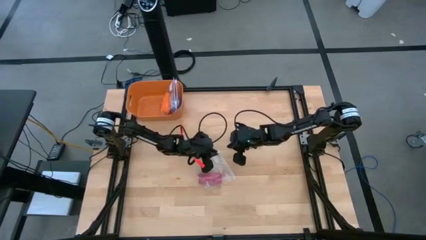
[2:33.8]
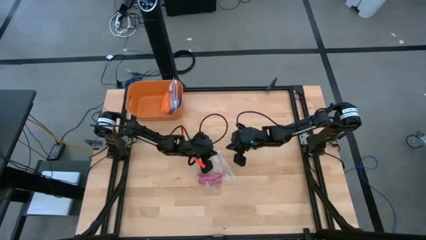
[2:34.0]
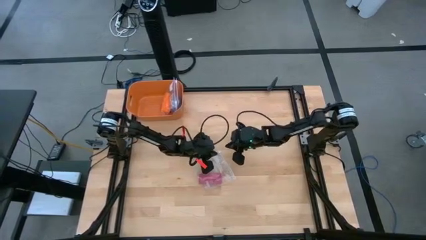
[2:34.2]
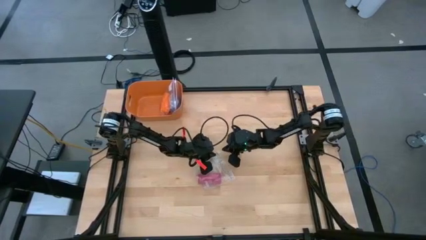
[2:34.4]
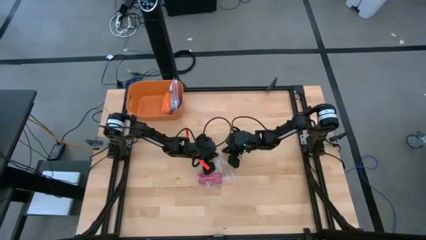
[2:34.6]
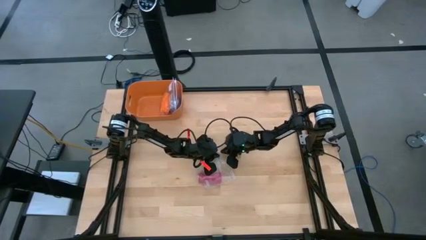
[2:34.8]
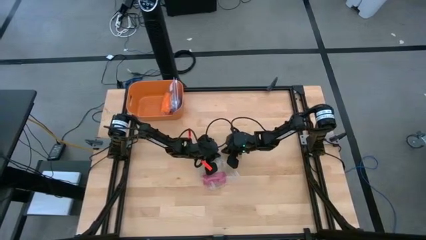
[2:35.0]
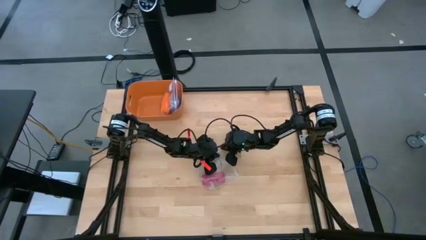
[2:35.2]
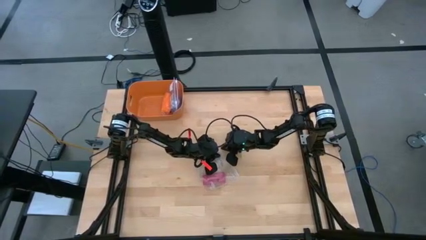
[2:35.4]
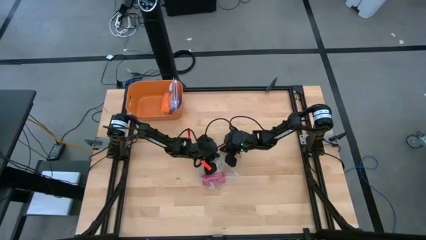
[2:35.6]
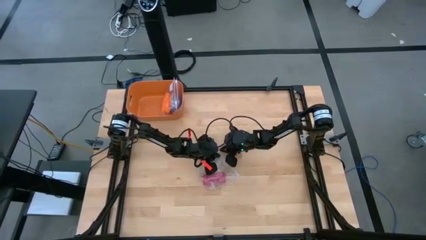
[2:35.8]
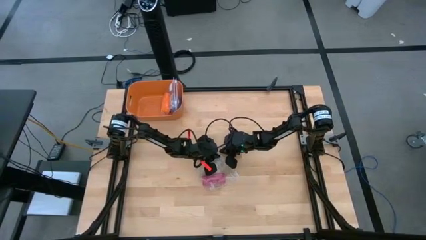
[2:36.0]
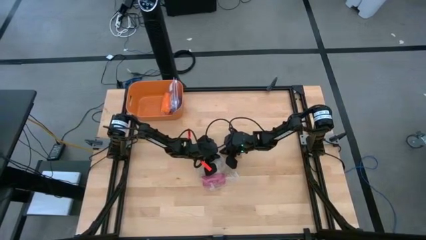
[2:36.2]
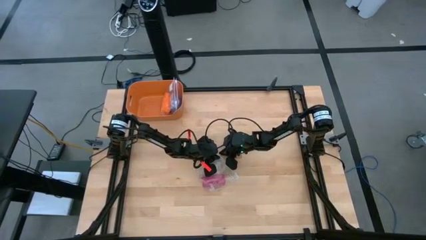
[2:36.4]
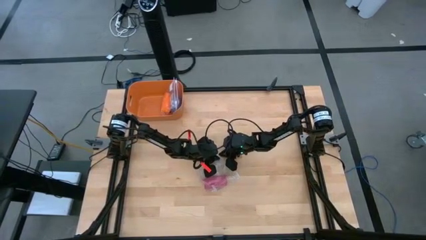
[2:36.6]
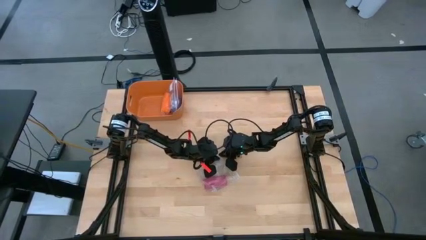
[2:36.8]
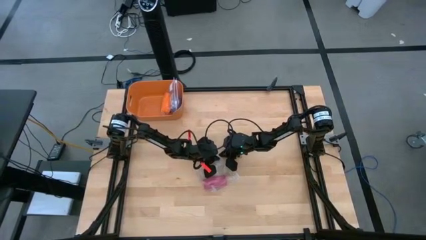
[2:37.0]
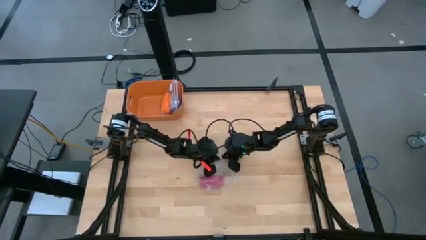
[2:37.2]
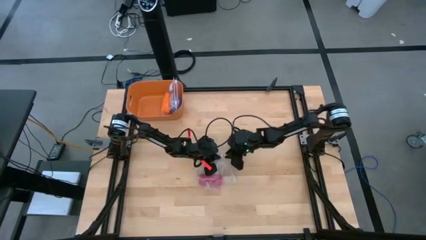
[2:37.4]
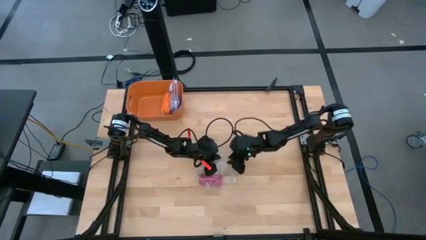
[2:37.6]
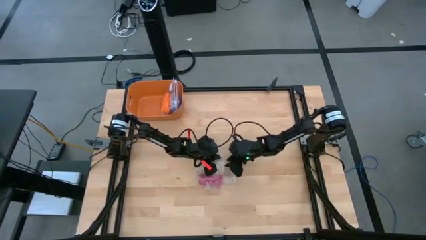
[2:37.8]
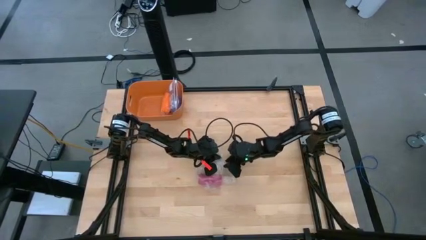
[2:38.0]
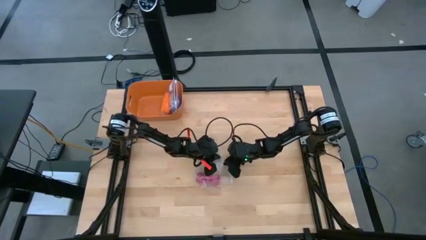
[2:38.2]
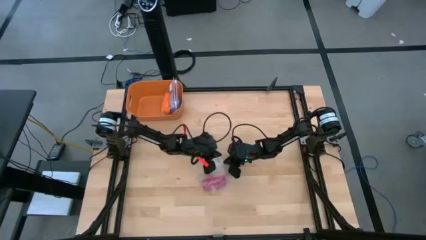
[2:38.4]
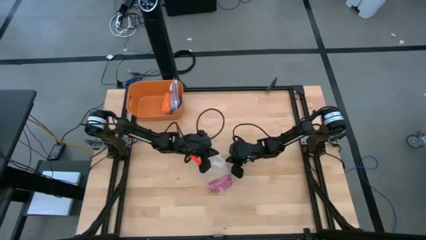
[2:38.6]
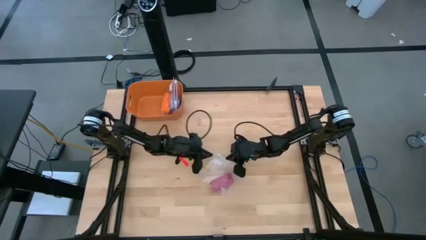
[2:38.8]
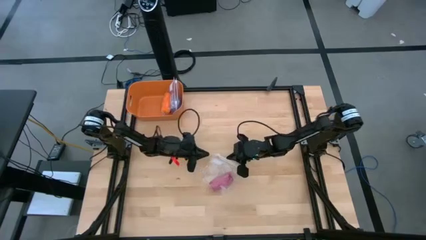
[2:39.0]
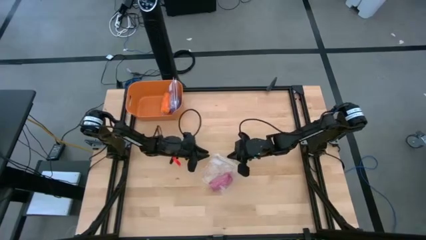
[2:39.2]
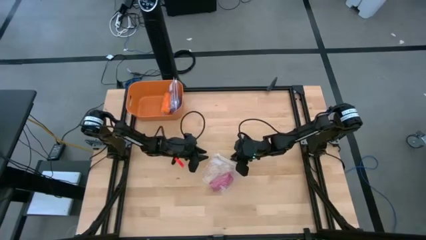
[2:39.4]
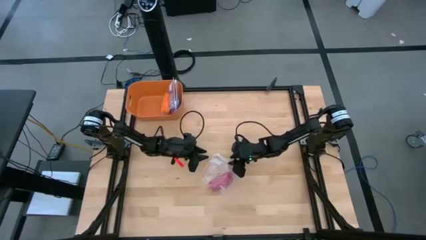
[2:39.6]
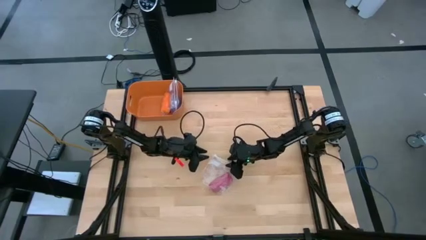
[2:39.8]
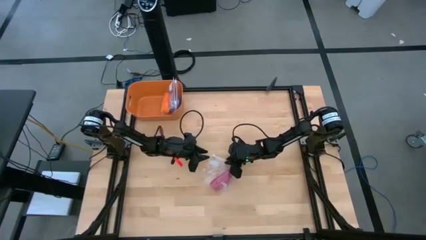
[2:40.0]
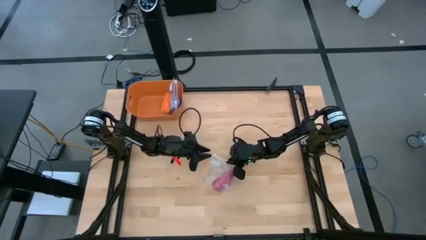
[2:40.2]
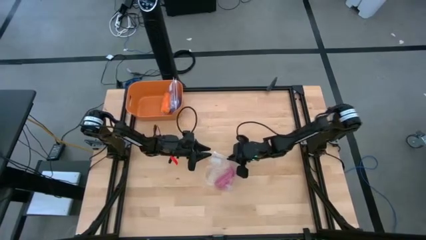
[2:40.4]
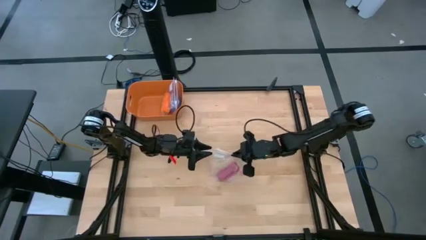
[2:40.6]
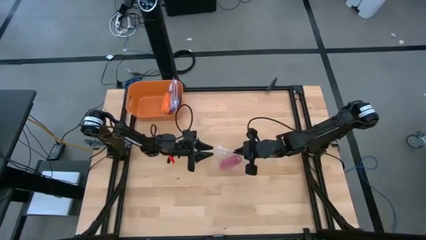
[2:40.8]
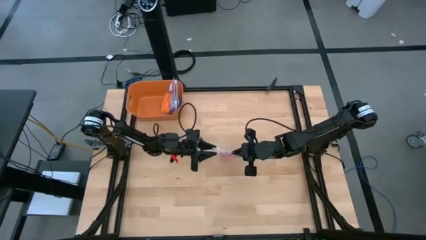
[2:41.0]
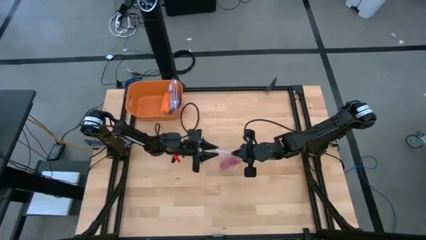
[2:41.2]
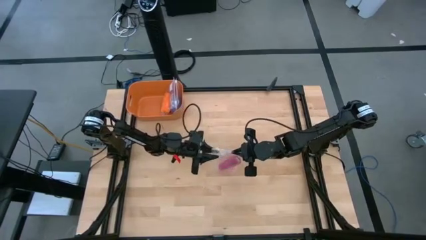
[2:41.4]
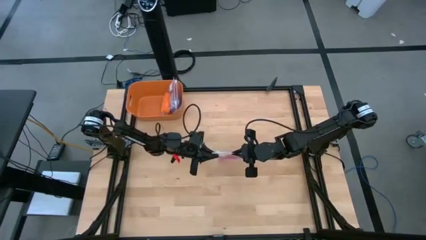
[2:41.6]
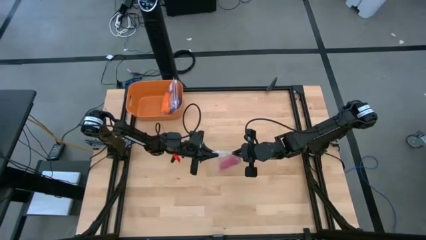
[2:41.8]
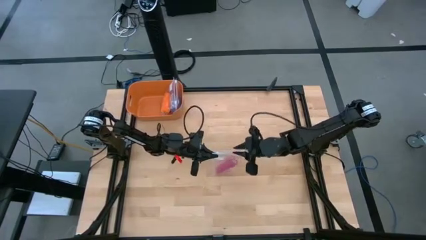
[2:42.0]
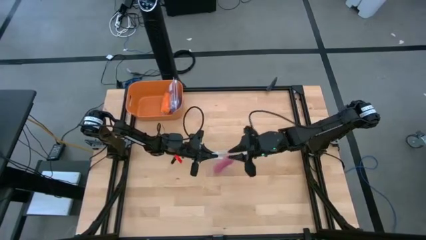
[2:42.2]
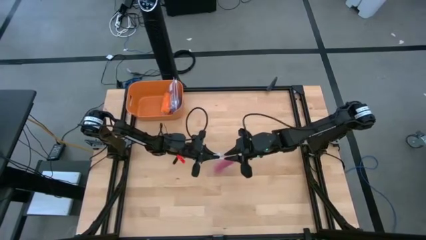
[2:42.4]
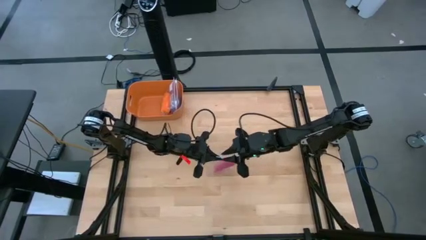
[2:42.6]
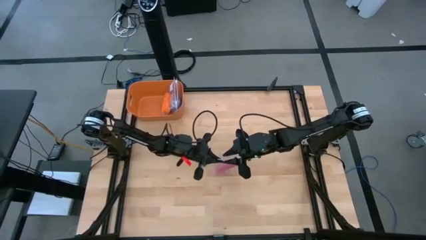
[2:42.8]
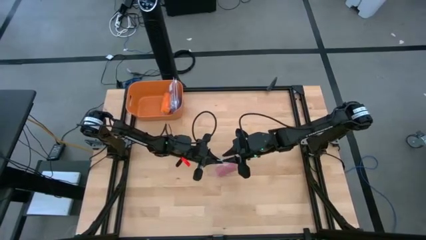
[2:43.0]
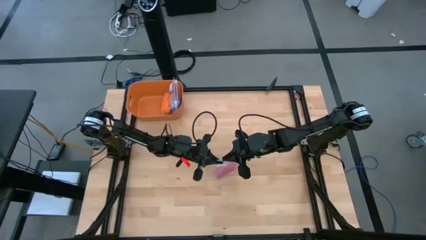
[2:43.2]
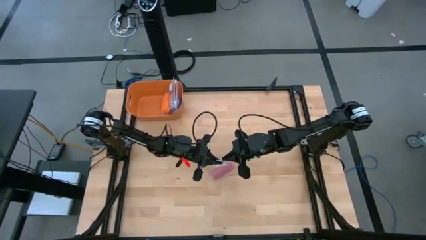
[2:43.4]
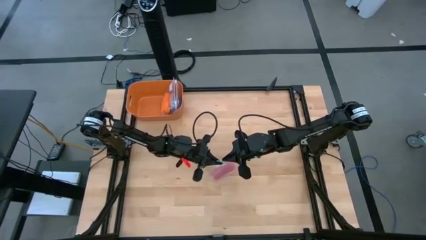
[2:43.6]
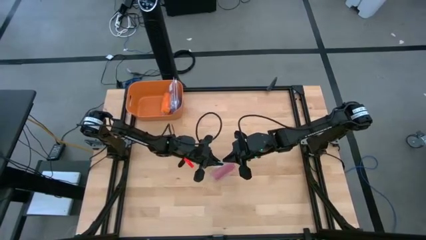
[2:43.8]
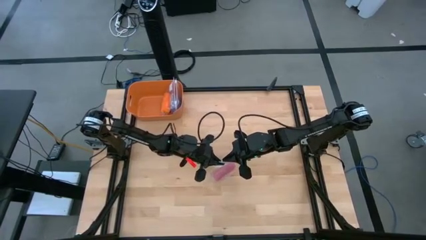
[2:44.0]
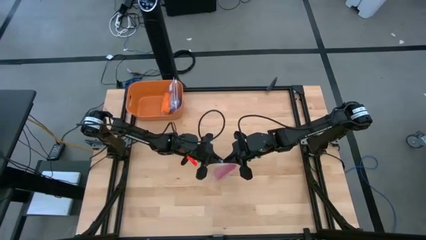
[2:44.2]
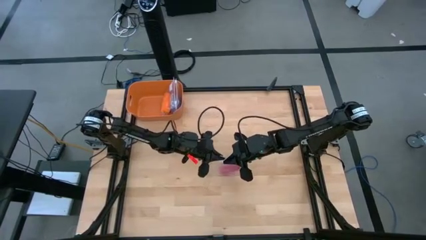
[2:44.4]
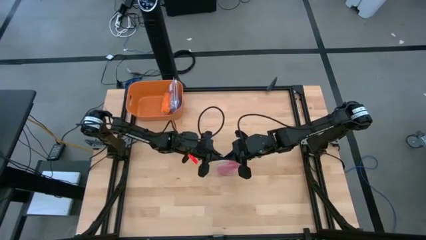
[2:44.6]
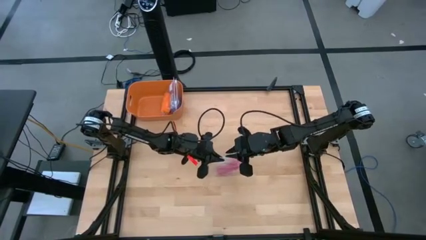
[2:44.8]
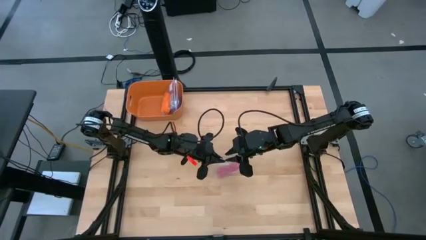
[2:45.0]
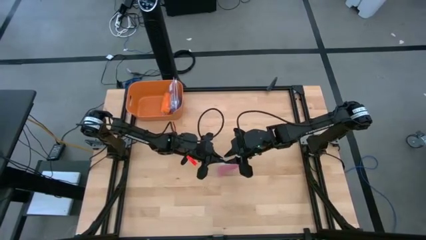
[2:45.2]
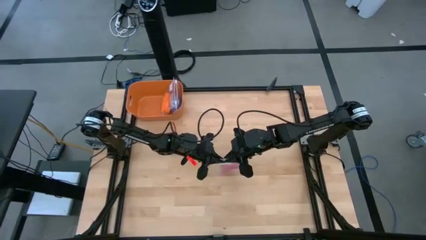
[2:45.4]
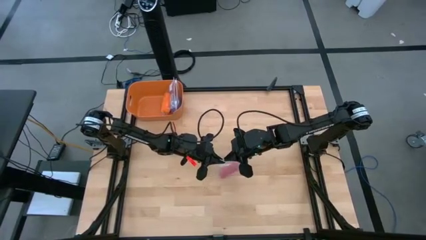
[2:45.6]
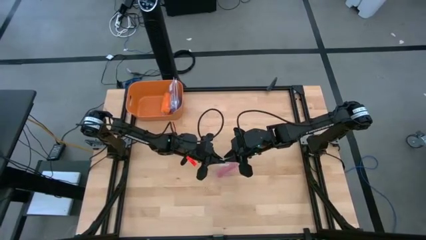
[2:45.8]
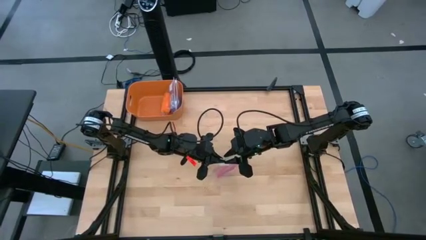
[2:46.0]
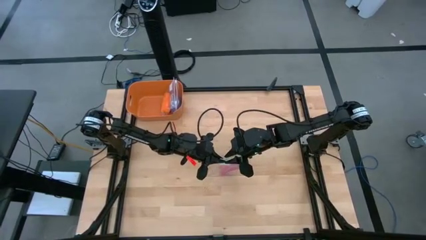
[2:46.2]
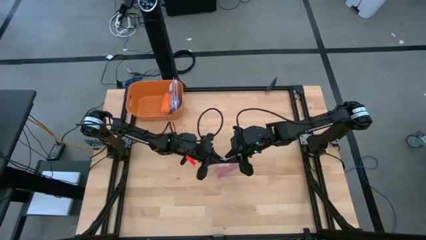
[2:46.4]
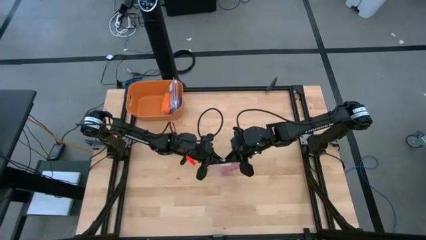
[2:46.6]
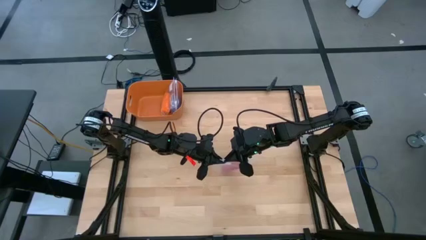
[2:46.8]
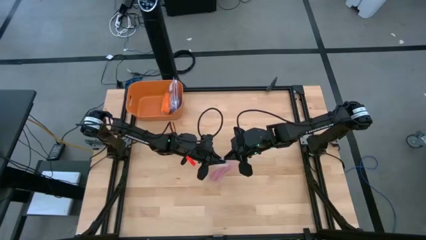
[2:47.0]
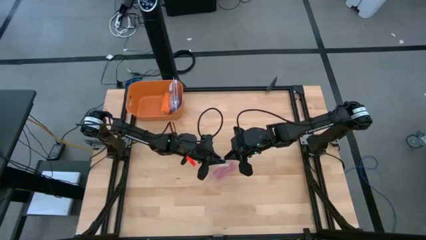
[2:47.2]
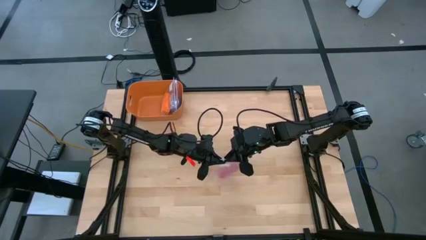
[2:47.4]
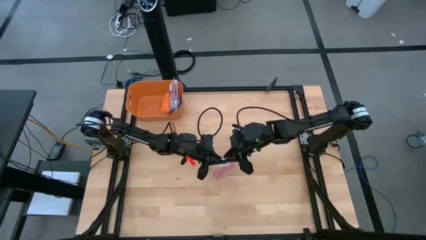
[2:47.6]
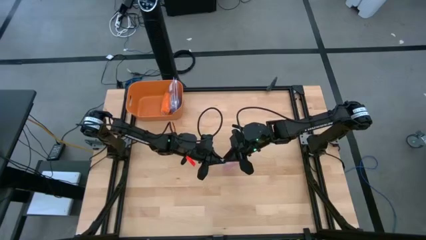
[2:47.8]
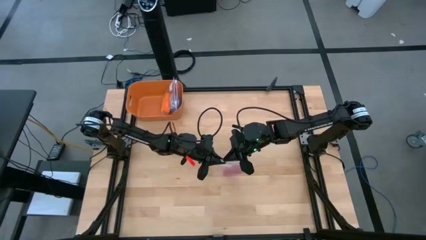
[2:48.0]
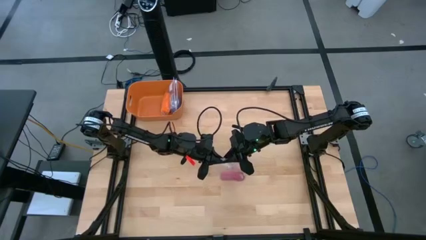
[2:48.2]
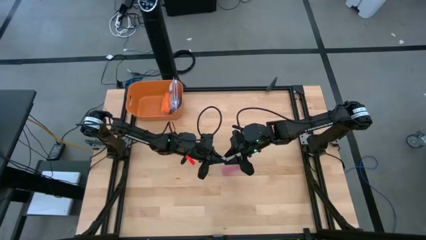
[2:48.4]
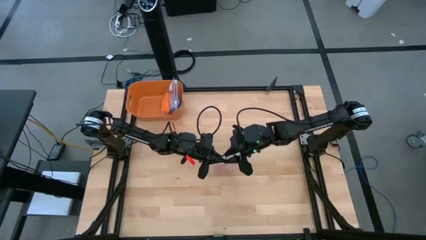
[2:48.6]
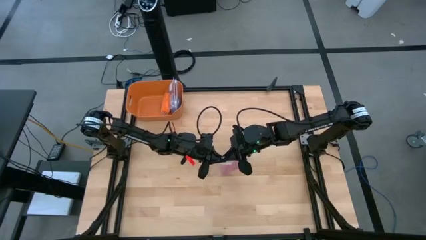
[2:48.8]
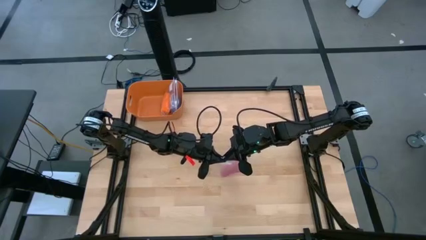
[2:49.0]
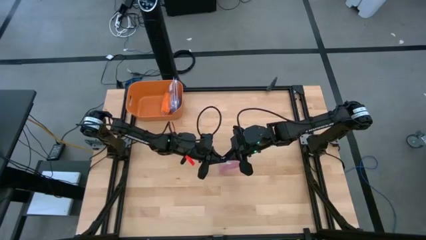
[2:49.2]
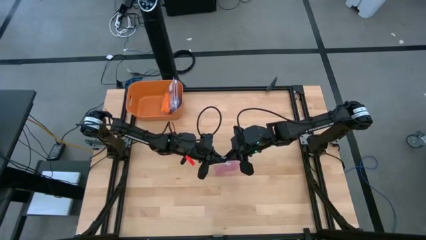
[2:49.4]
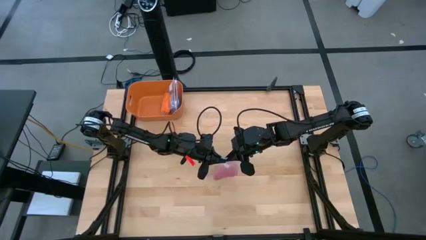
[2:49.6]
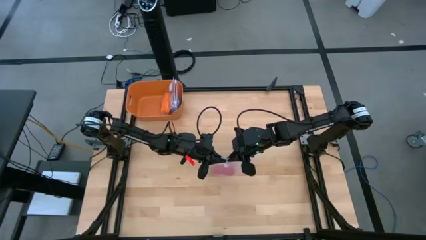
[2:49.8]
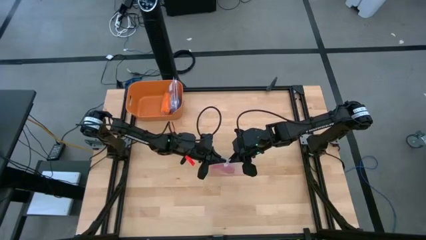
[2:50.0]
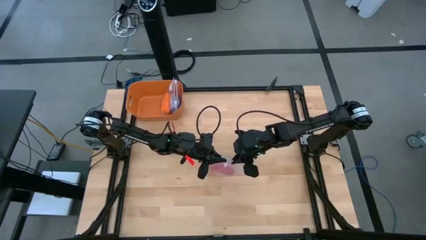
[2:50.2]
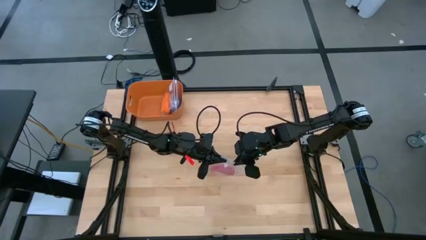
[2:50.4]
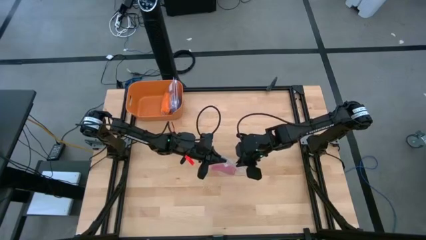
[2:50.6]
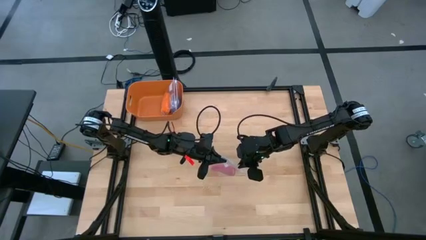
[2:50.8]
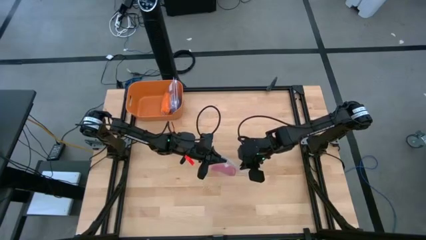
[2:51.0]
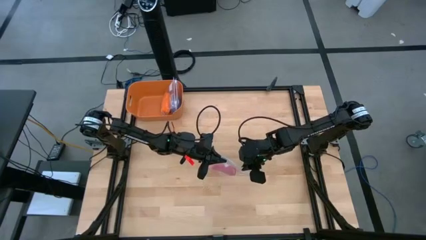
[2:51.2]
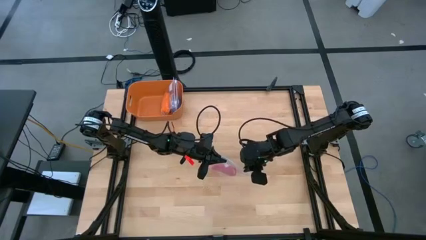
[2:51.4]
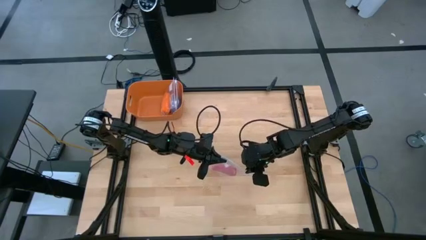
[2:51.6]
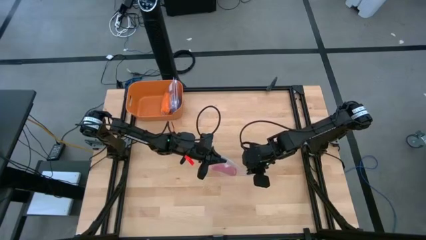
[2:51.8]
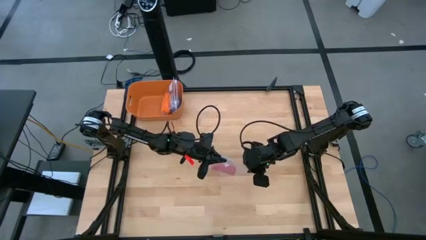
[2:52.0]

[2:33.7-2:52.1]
Task: Roll bandage
Close the transparent zip bag
